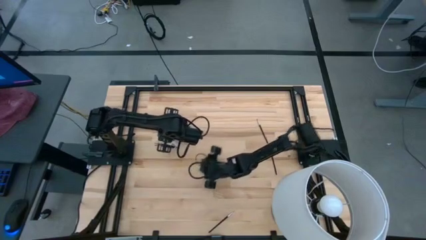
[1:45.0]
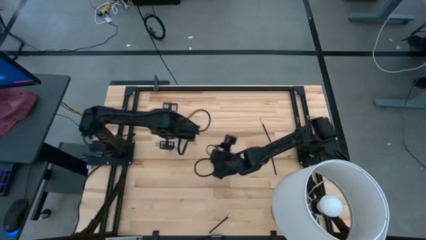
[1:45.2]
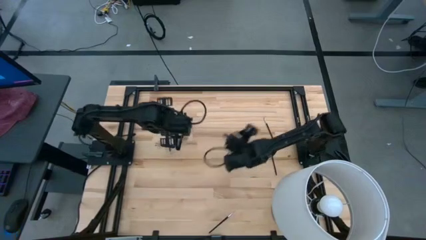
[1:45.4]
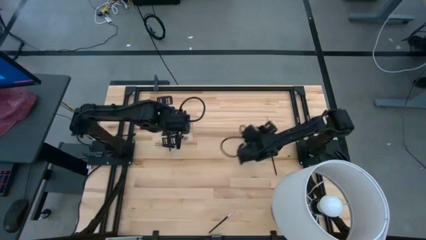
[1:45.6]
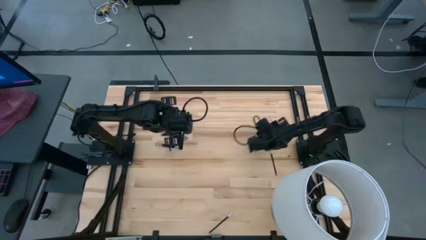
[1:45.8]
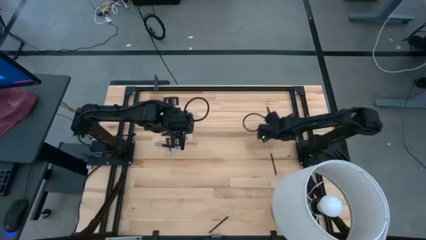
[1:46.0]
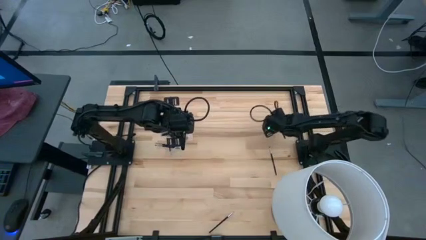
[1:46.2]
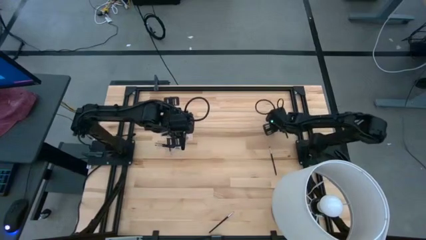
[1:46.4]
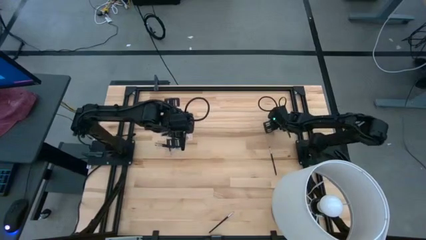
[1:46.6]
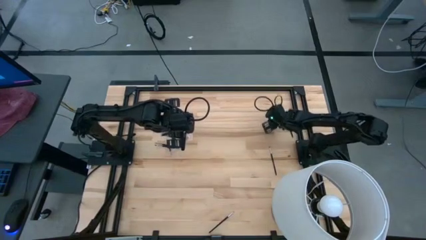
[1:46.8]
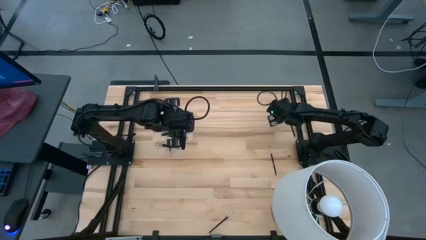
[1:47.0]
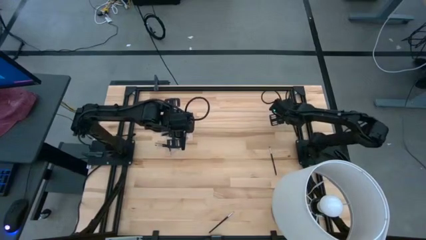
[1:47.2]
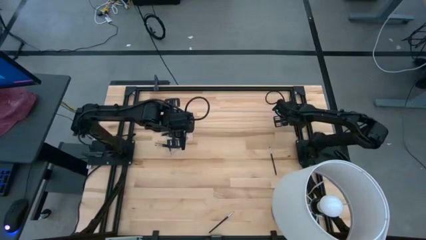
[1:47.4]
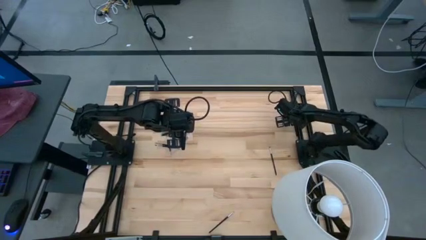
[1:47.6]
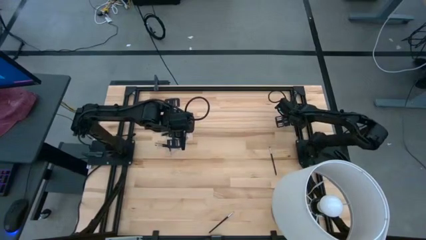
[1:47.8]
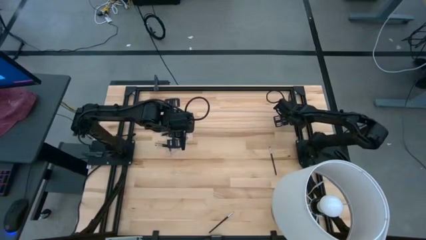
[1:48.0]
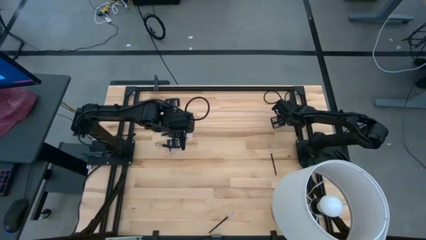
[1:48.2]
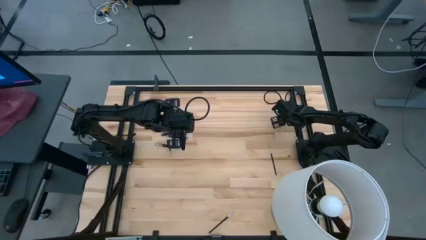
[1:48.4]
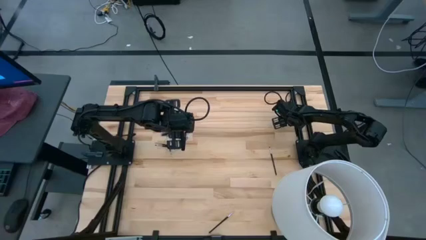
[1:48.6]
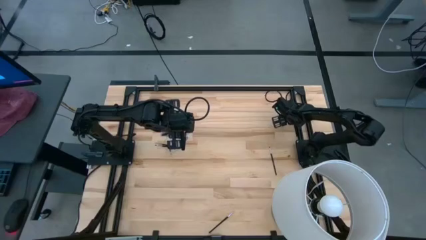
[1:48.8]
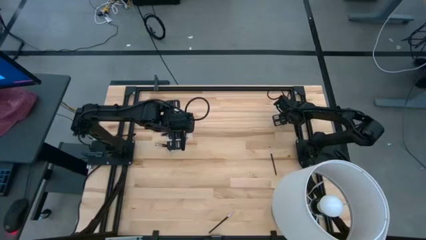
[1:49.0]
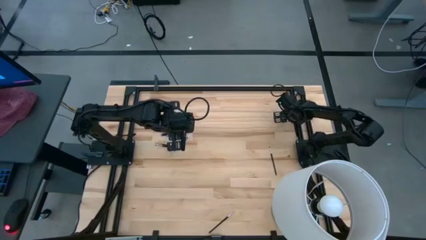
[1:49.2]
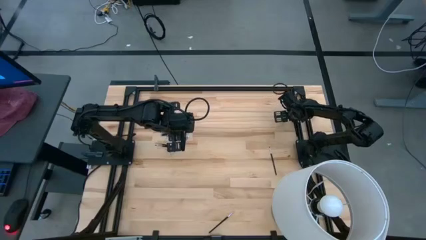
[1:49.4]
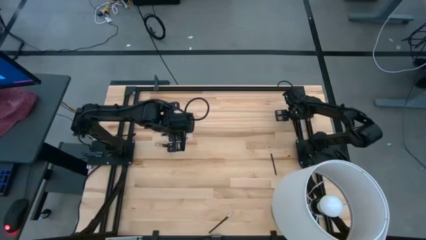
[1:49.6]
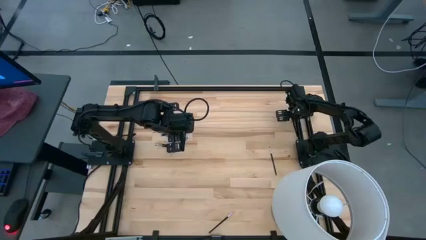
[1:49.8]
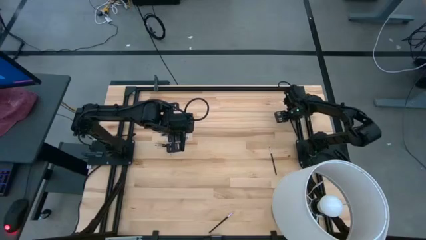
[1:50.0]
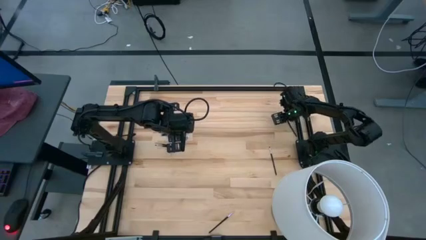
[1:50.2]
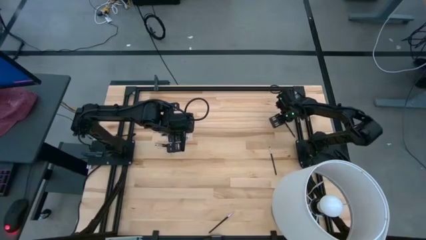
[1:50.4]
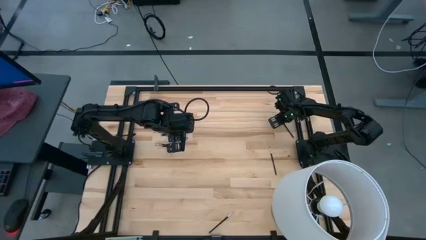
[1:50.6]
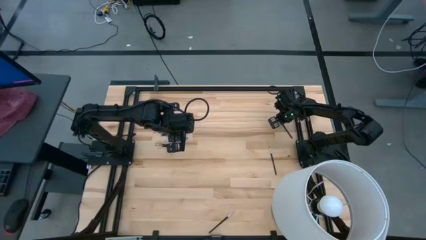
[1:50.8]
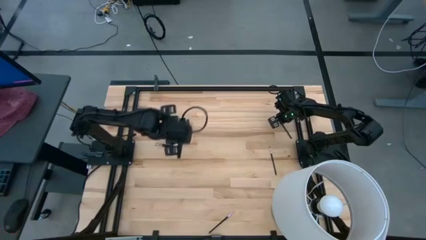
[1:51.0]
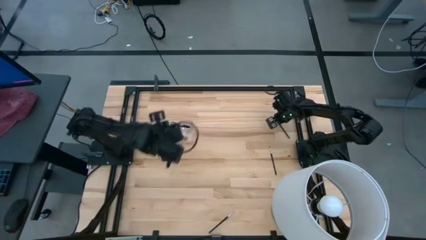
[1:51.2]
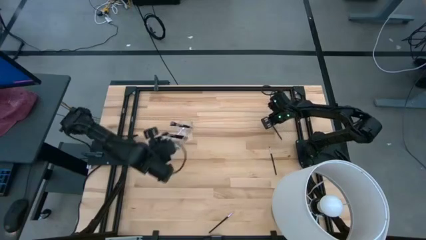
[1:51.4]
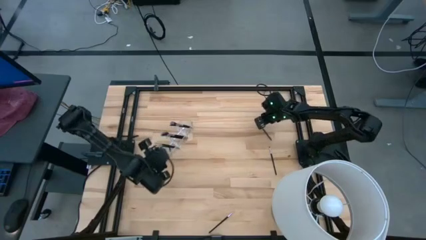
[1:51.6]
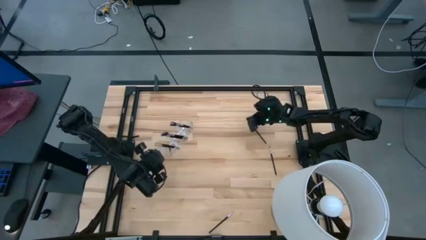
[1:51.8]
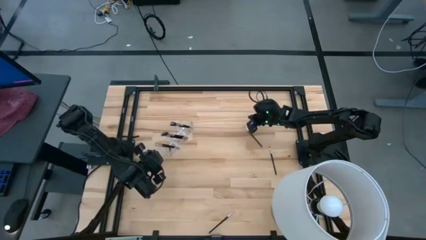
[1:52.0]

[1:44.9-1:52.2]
Task: Put items in baskets/containers
Put the eyeshadow brush into the left section of the transparent organizer

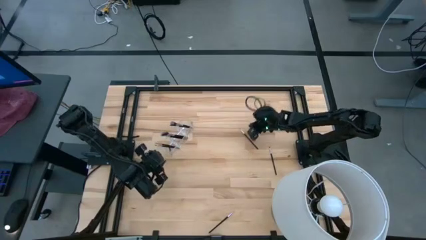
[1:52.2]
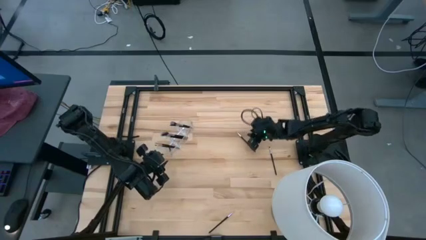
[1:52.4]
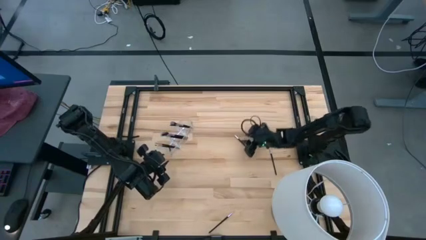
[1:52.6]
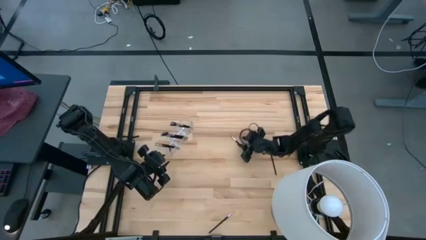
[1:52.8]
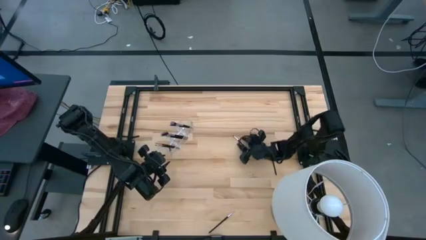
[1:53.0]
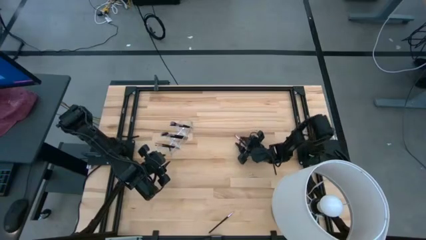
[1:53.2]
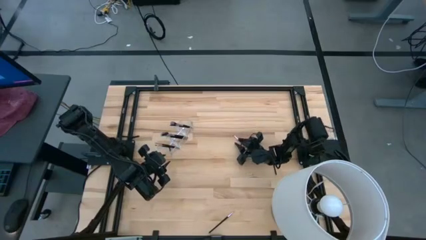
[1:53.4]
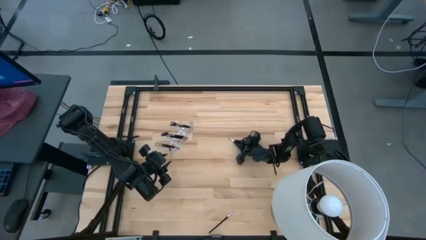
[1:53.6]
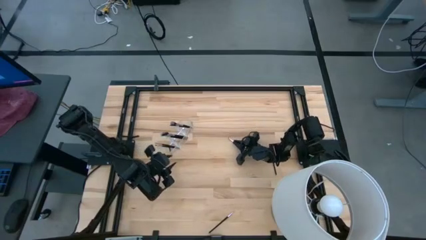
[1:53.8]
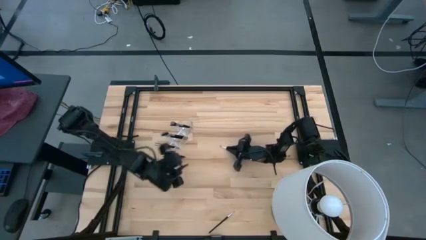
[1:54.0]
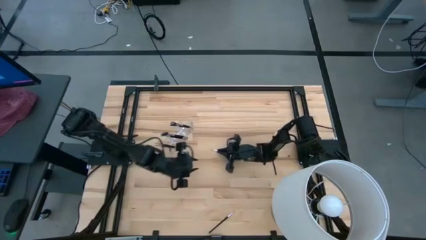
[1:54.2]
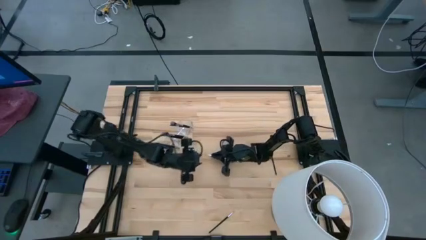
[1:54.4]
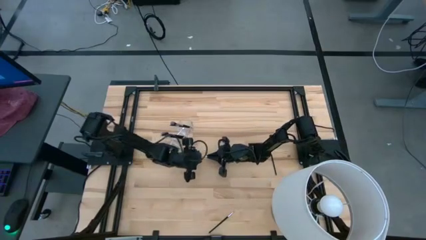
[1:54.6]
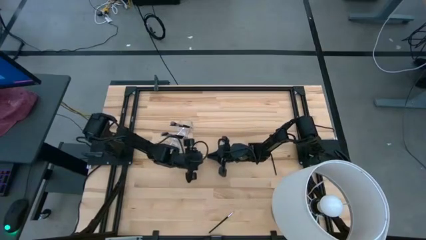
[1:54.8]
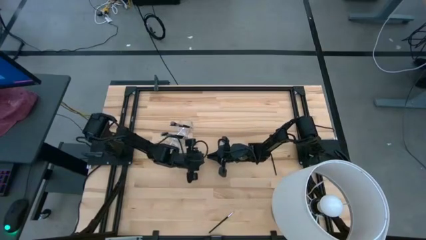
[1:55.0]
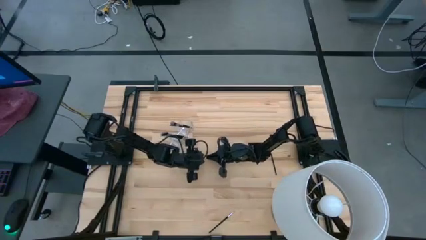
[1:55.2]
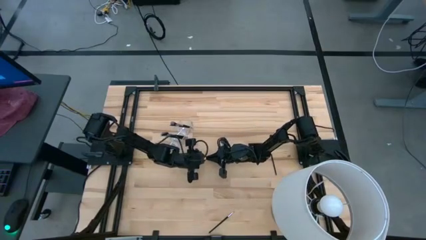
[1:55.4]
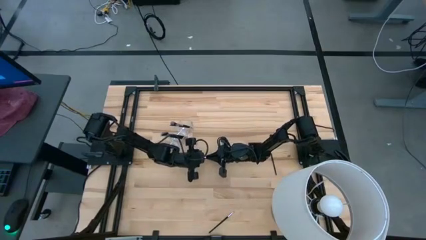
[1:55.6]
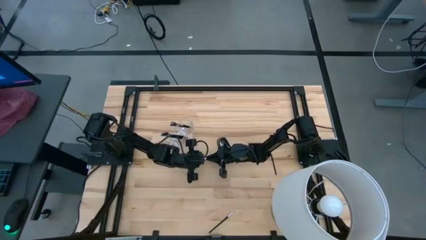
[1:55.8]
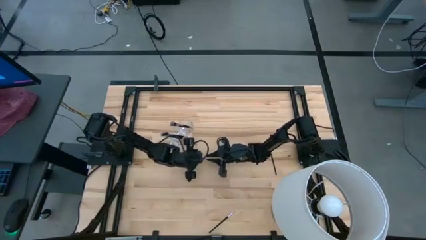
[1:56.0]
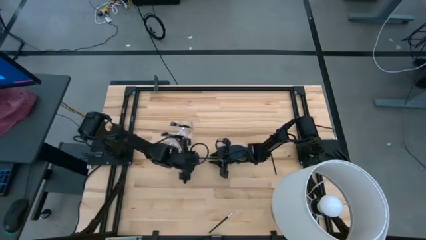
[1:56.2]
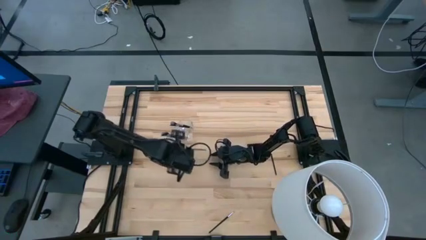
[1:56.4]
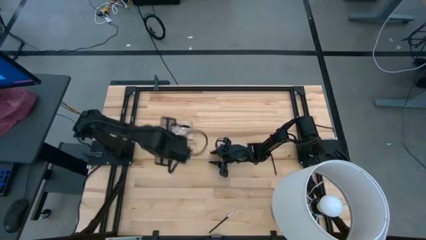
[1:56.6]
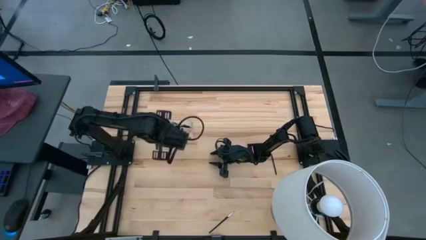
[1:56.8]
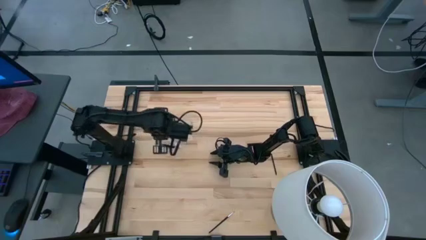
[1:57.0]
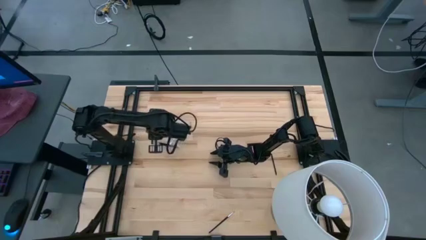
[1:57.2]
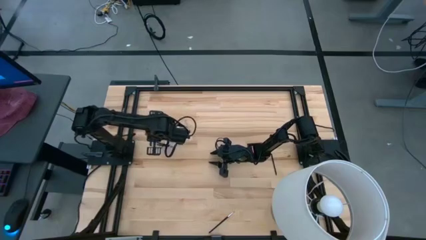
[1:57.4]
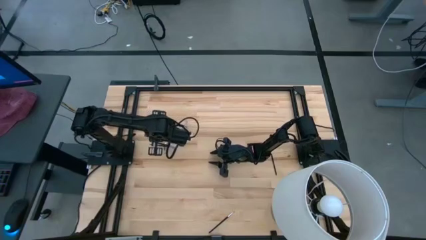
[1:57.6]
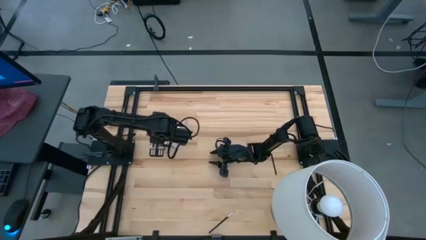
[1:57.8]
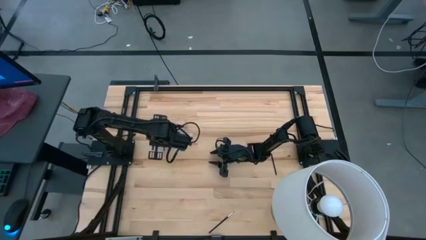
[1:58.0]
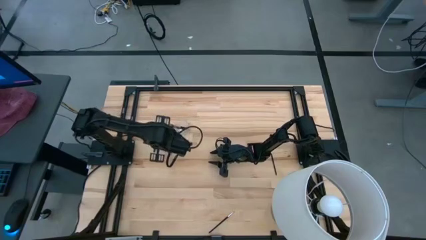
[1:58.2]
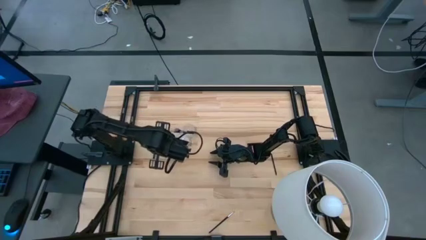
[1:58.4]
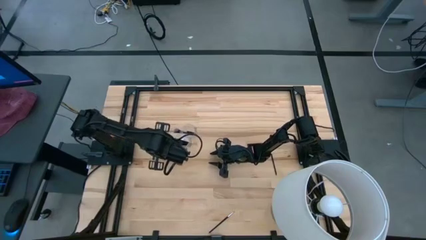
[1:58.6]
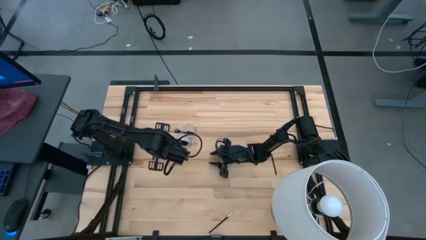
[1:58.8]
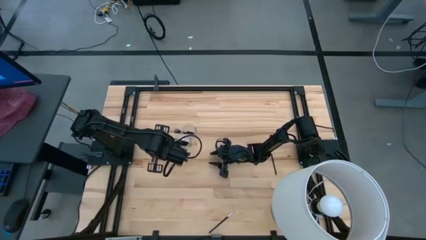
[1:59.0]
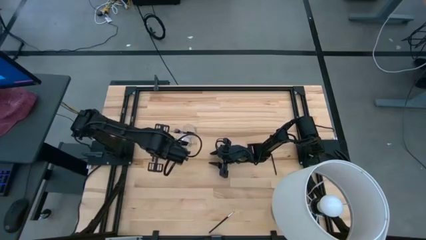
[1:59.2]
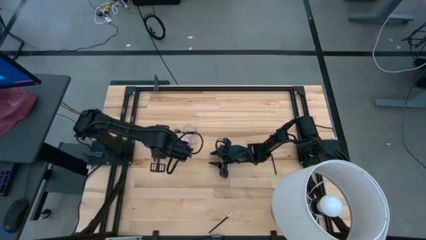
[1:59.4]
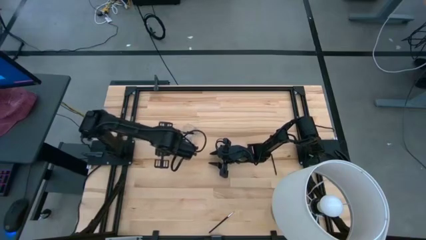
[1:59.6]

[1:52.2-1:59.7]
Put the eyeshadow brush into the left section of the transparent organizer

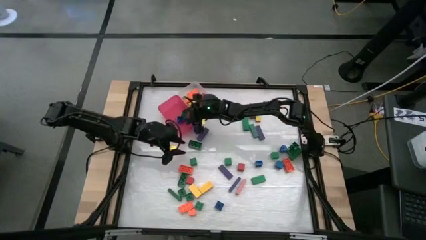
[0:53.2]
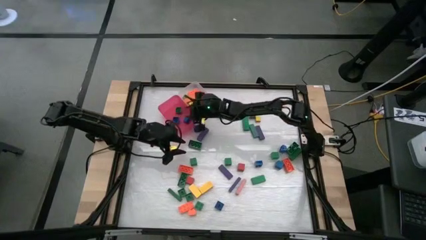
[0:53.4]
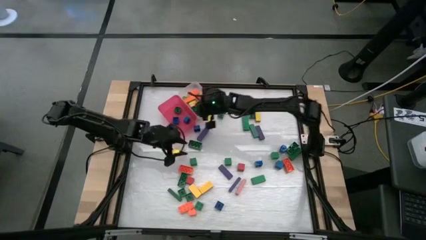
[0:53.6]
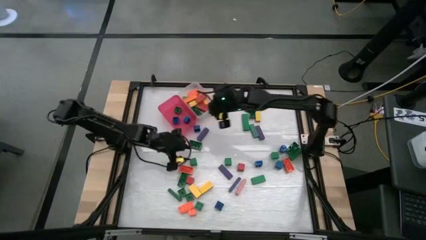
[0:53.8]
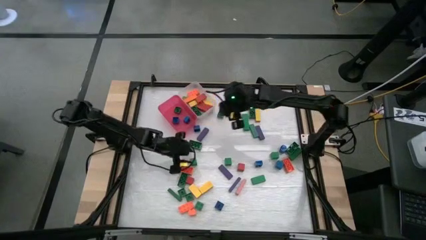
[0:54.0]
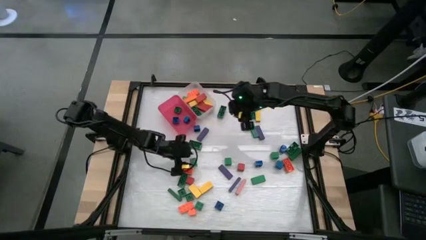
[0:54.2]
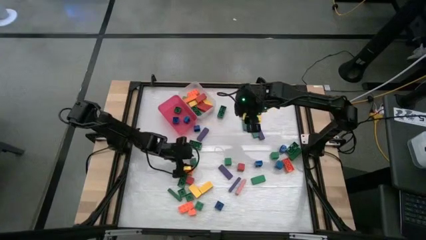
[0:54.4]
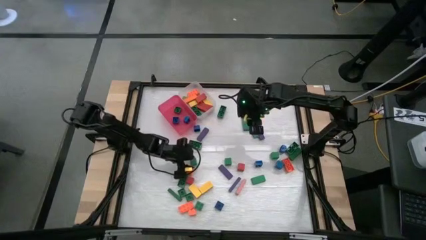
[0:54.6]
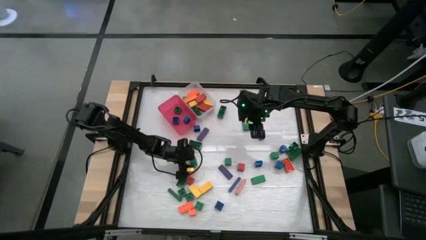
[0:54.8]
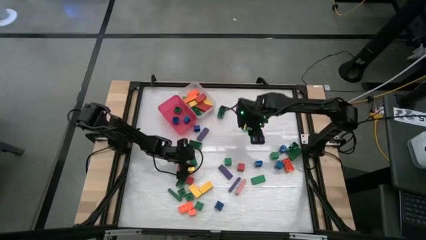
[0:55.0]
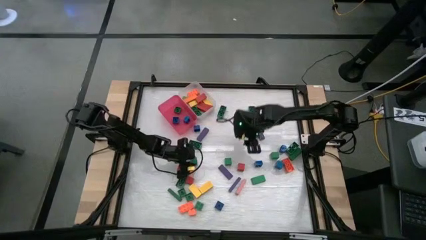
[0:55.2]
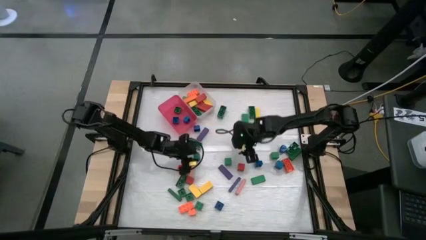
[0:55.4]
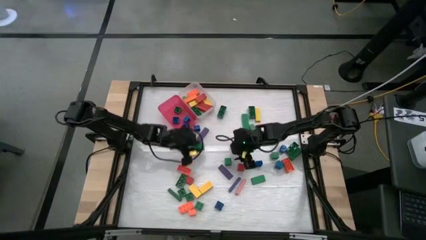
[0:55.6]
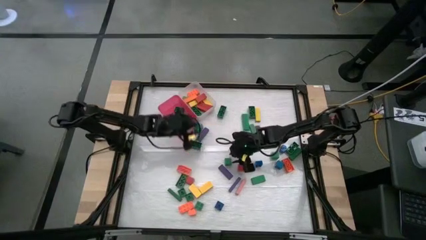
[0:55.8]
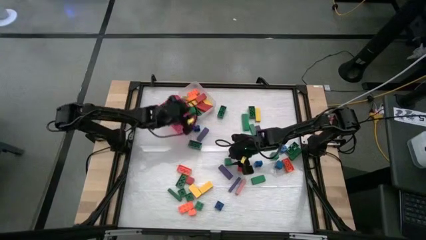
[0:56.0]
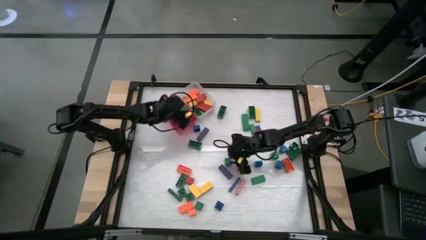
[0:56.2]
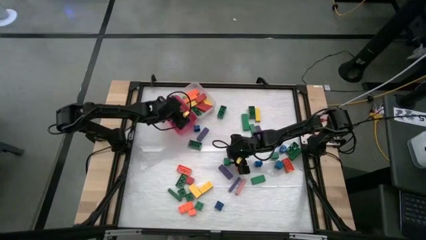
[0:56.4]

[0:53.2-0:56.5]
Task: Sort blocks by size
Put the small green block into the pink bin
